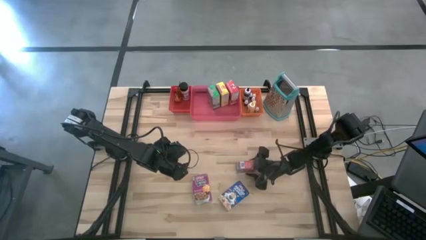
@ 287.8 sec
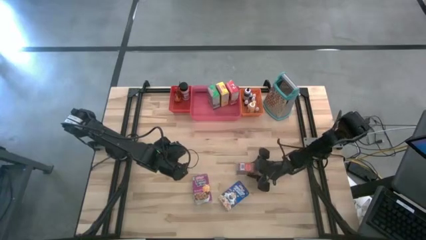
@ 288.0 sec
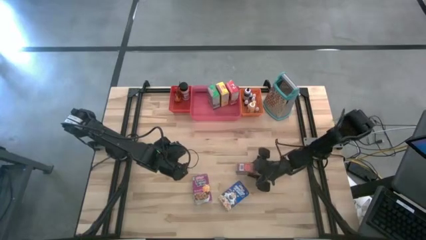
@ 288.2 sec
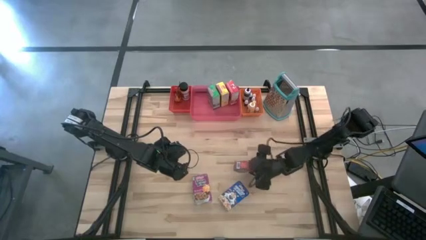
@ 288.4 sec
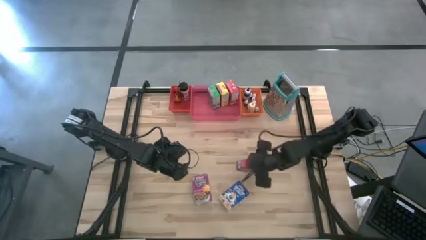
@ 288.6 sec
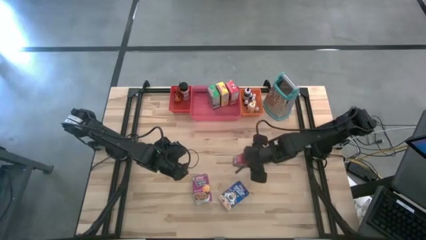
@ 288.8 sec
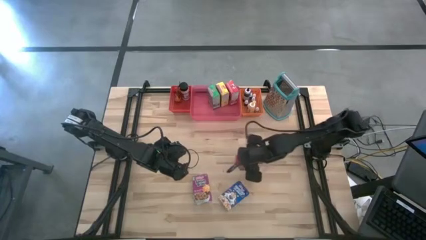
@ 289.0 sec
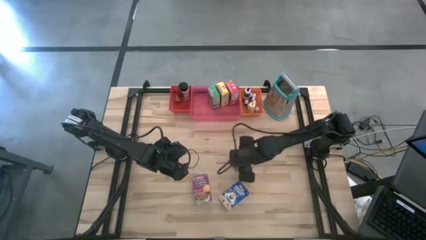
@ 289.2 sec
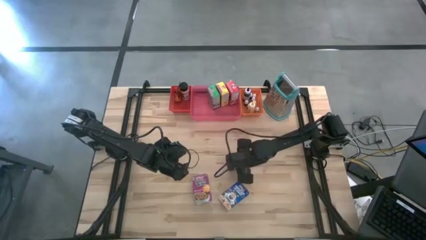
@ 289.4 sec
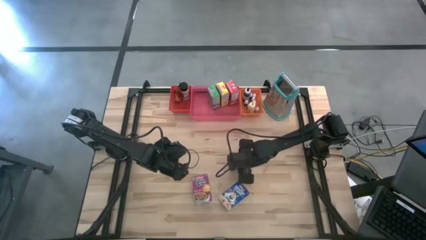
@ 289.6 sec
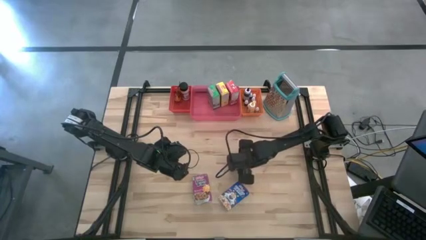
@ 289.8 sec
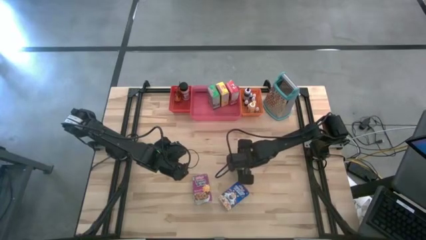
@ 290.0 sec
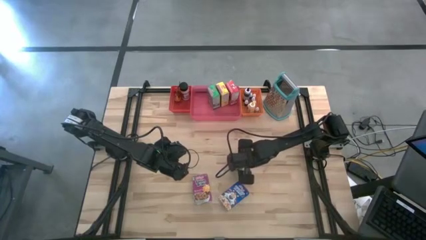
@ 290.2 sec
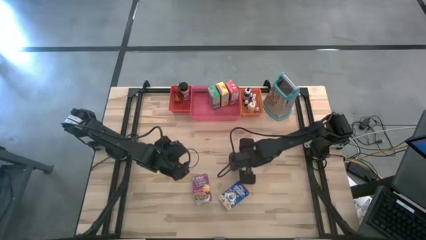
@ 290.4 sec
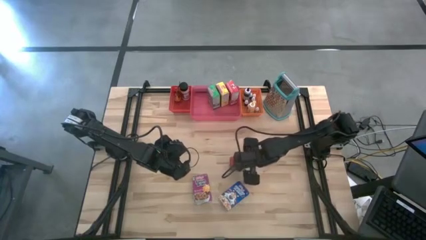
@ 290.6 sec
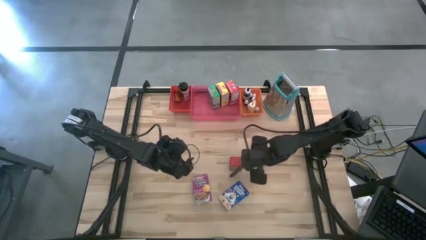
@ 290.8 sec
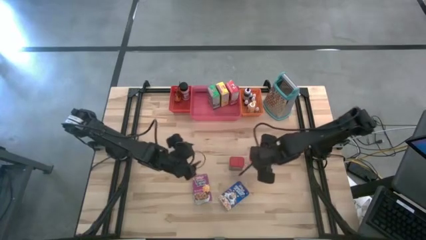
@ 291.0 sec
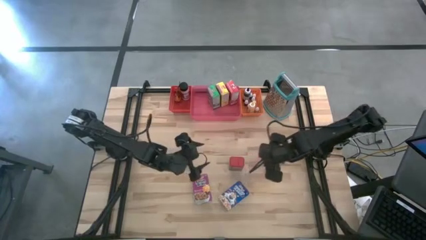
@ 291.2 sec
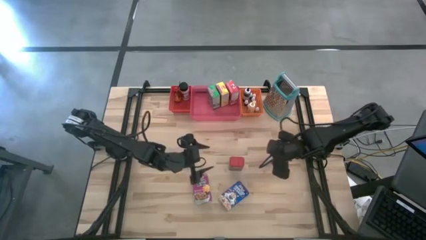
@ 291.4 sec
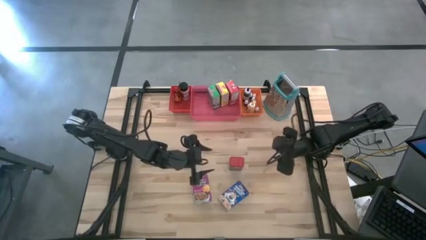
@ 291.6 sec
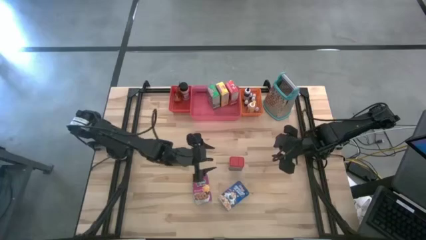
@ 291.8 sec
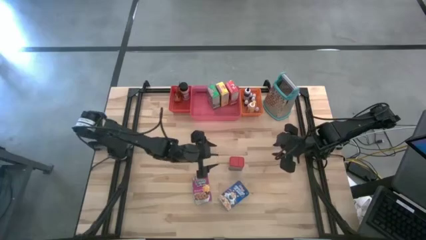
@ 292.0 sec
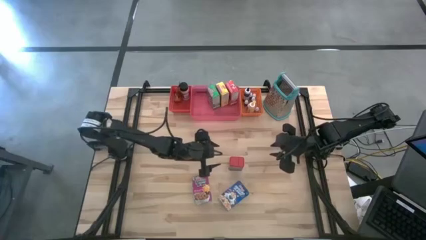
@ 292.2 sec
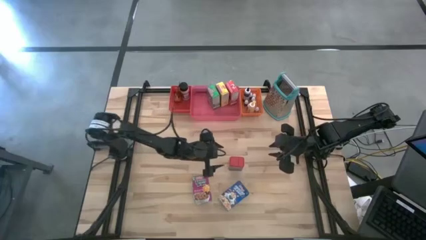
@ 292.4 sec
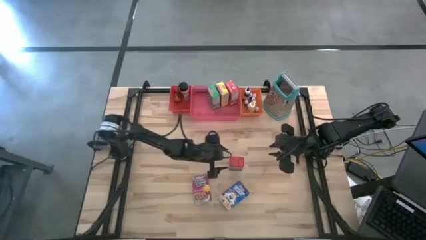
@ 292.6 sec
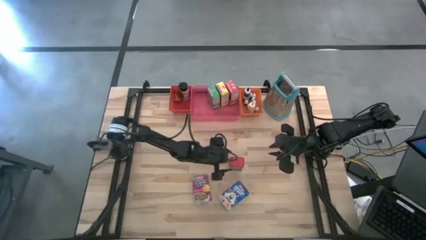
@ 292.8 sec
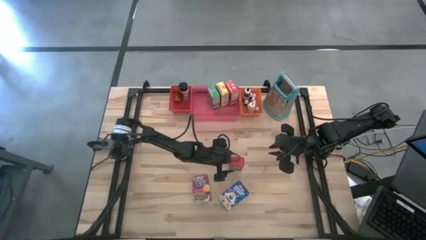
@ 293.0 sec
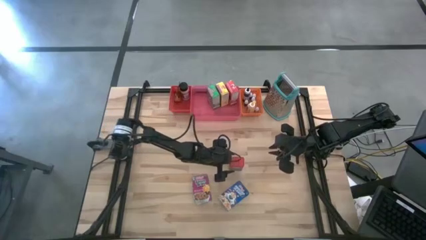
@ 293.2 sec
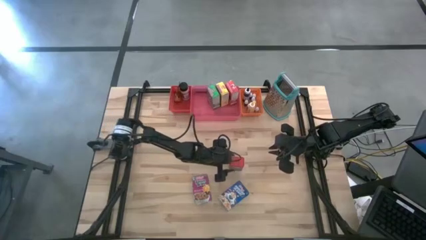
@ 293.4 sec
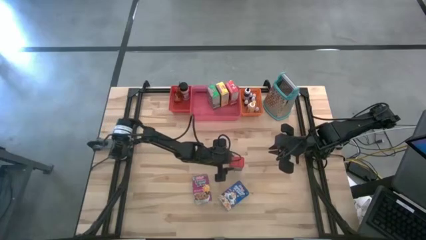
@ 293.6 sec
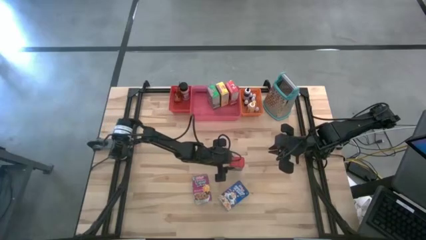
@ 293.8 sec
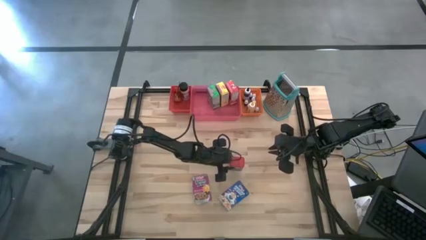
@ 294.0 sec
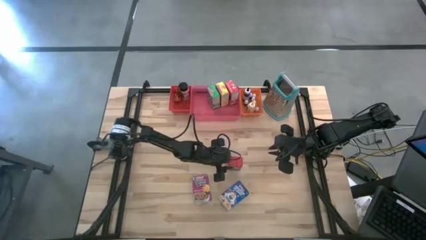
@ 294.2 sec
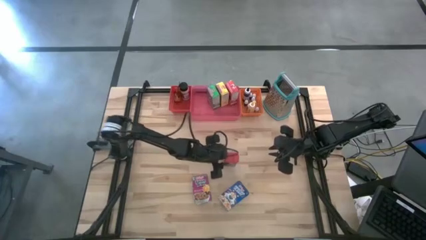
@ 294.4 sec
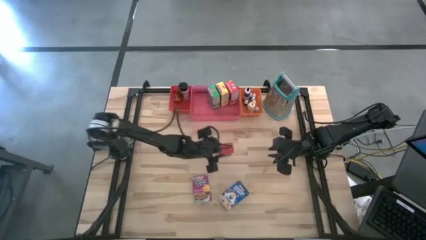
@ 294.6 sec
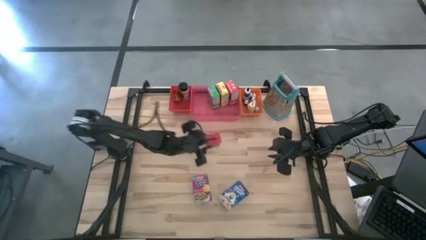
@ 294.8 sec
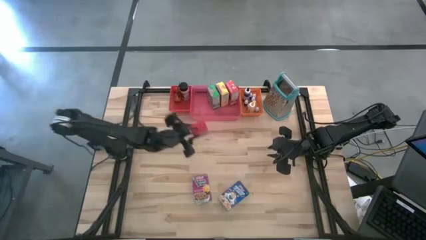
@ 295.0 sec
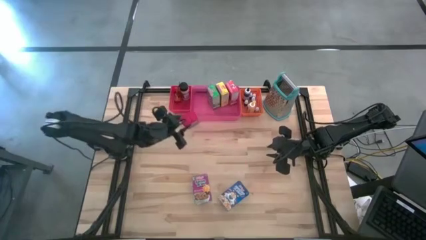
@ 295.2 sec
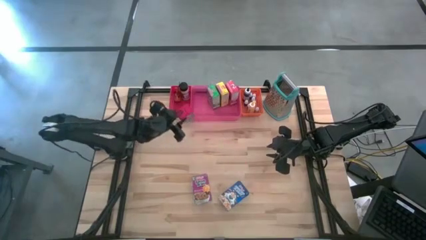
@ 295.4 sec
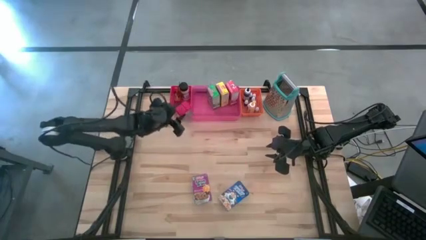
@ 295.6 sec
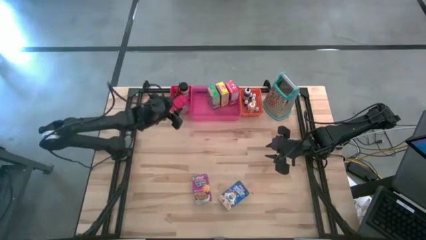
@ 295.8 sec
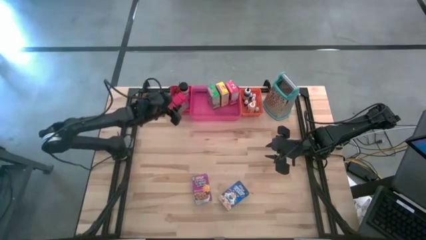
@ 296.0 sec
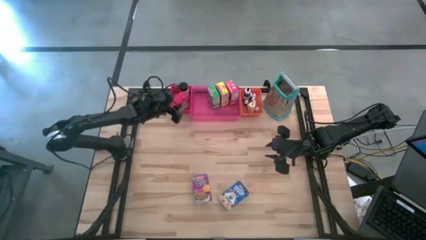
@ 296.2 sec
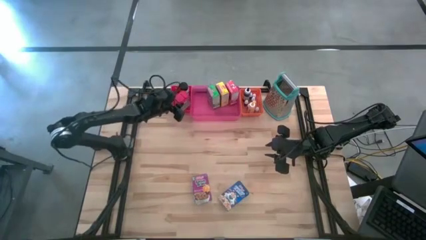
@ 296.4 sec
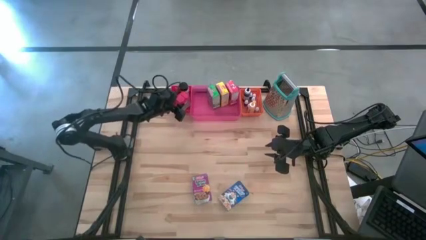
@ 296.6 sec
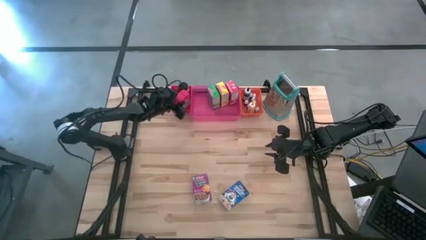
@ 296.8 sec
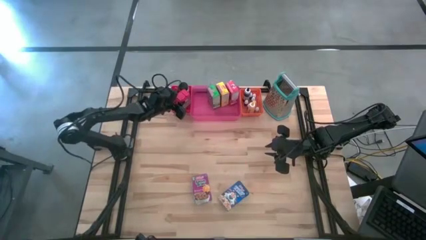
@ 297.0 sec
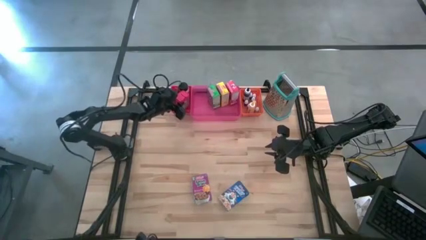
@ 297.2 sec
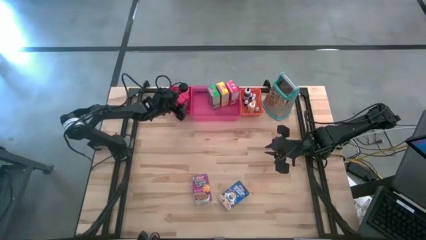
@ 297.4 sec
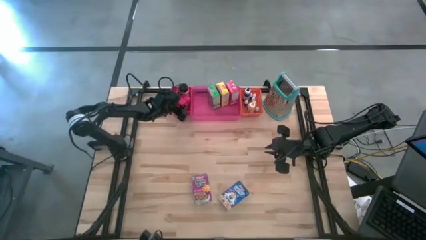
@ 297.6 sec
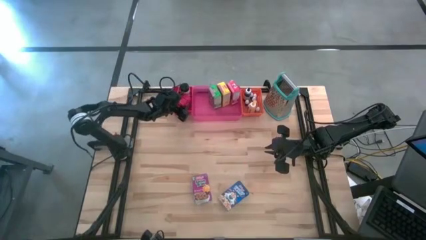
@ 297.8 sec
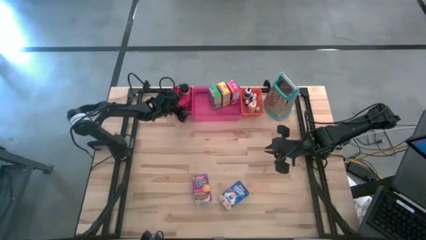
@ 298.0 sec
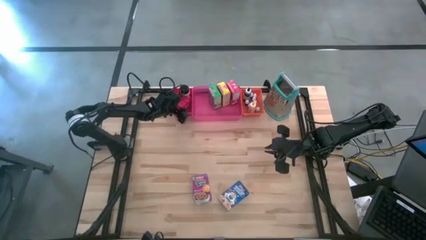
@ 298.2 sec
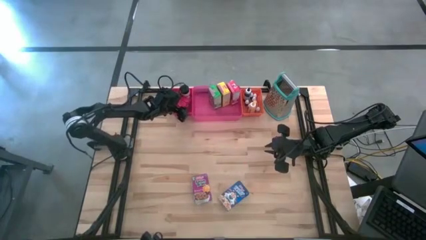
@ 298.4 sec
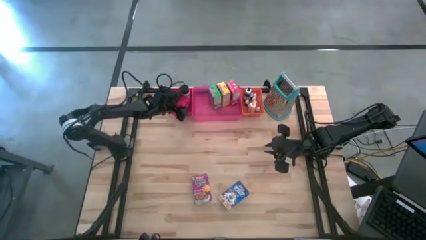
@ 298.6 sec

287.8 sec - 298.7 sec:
Task: Pick & Place Kitchen Items
Put the red seasoning can into the red bin
